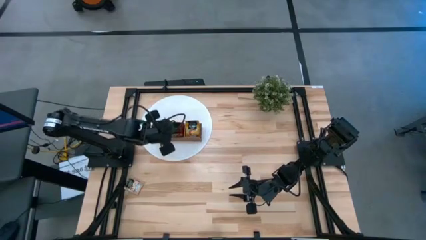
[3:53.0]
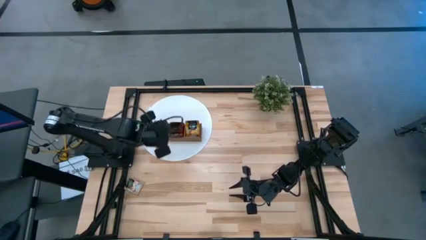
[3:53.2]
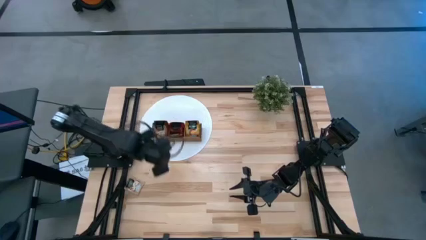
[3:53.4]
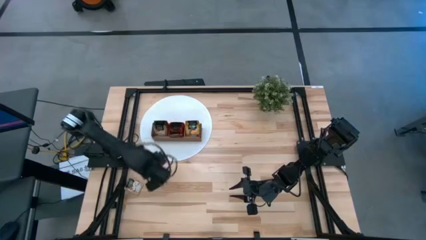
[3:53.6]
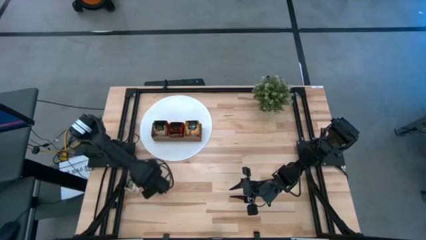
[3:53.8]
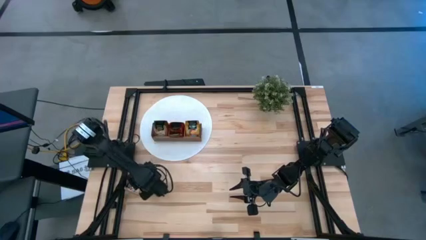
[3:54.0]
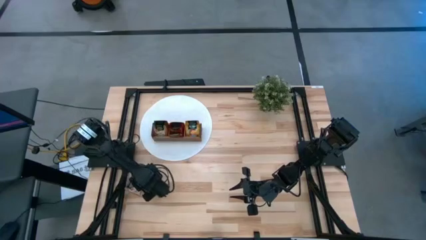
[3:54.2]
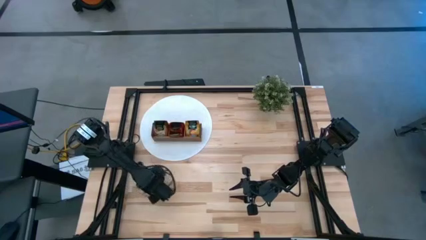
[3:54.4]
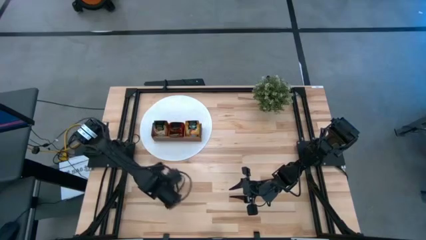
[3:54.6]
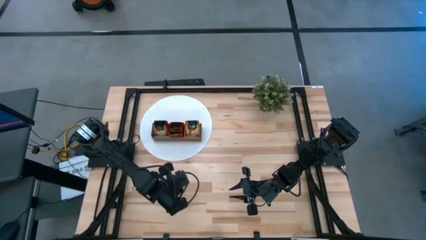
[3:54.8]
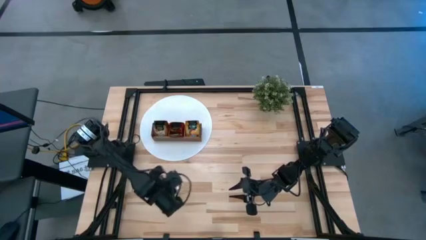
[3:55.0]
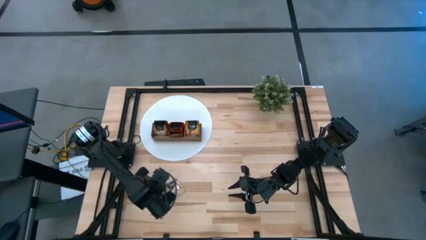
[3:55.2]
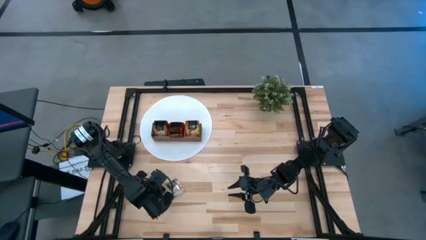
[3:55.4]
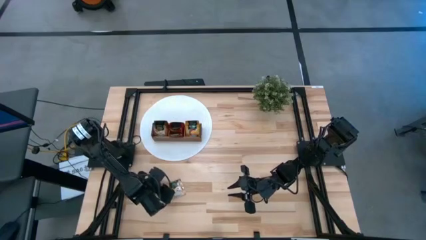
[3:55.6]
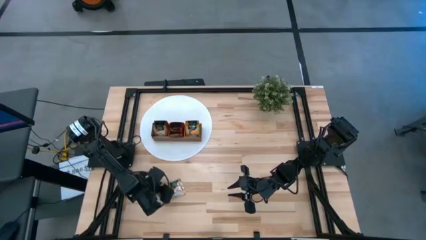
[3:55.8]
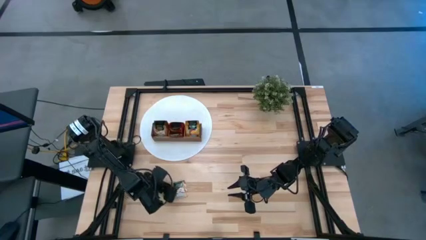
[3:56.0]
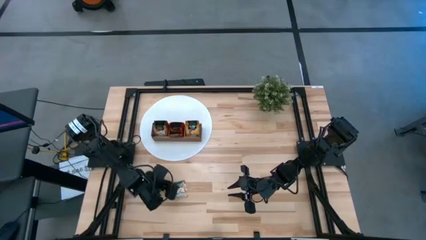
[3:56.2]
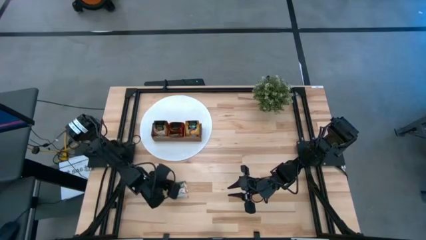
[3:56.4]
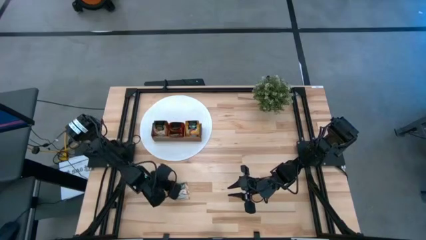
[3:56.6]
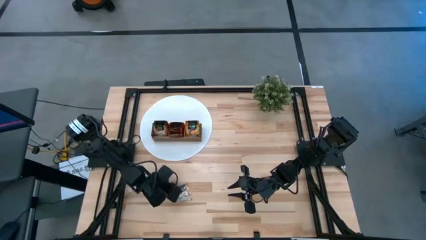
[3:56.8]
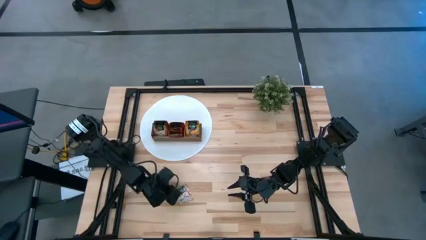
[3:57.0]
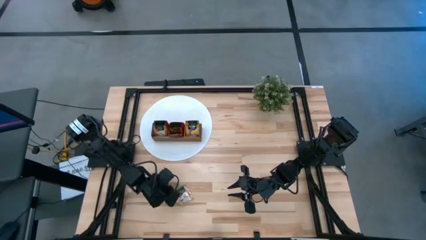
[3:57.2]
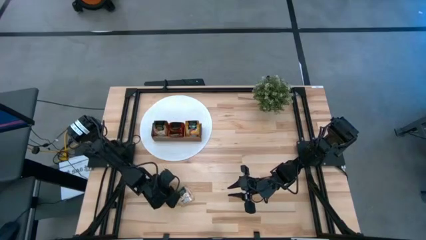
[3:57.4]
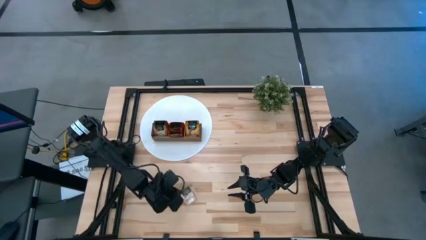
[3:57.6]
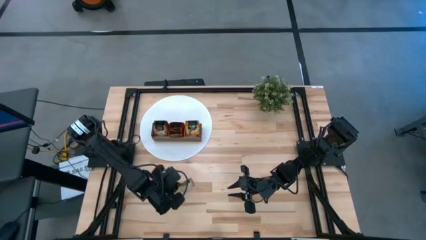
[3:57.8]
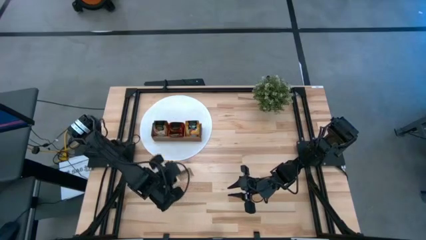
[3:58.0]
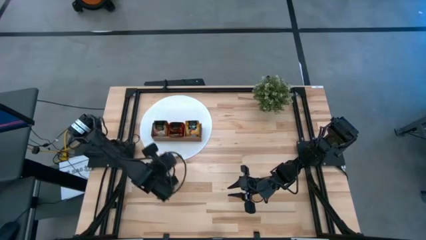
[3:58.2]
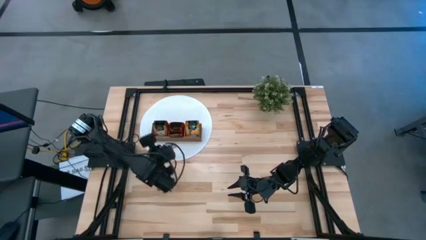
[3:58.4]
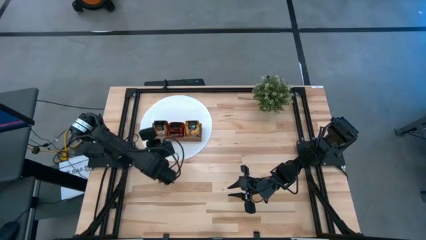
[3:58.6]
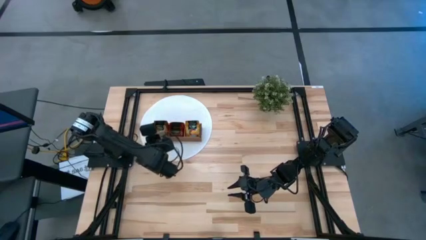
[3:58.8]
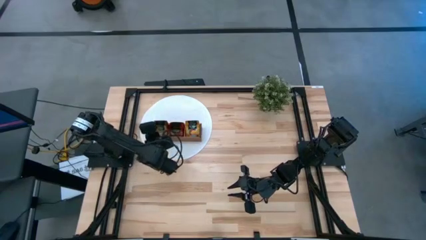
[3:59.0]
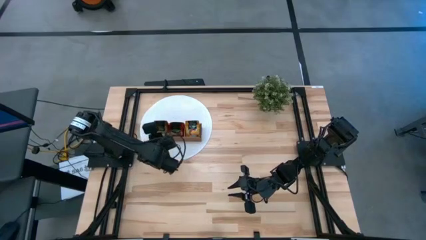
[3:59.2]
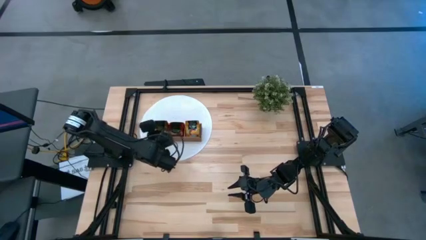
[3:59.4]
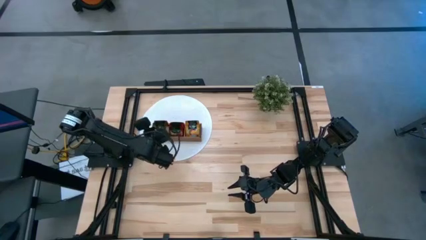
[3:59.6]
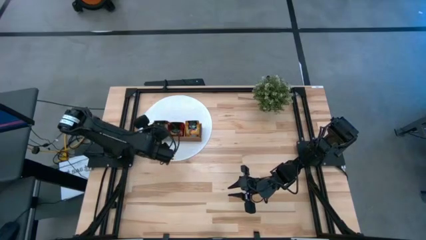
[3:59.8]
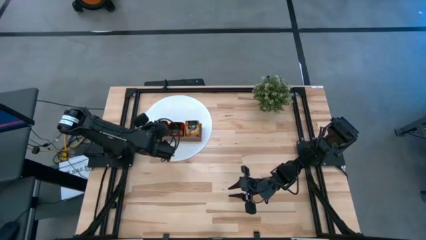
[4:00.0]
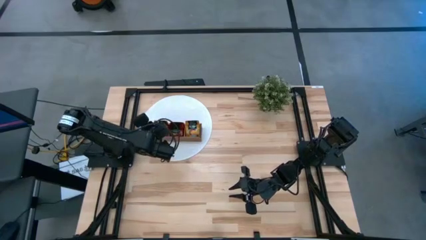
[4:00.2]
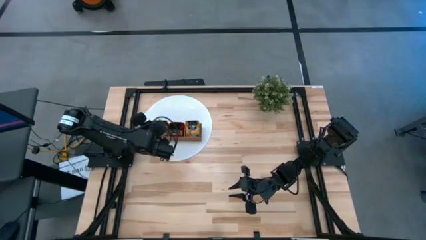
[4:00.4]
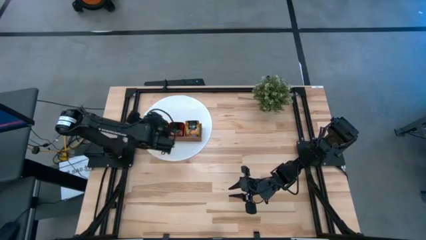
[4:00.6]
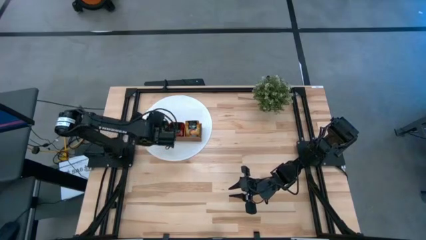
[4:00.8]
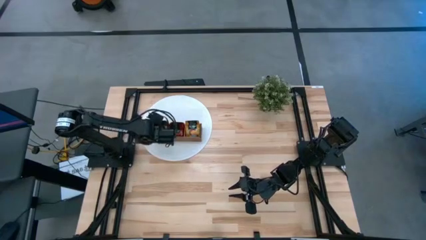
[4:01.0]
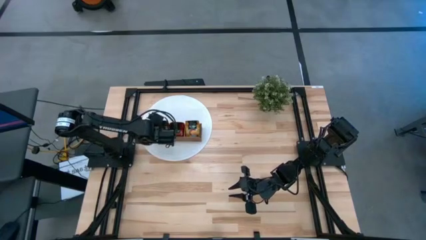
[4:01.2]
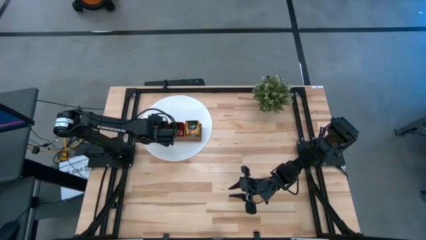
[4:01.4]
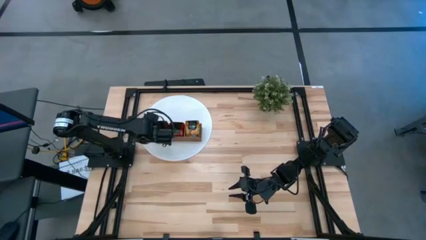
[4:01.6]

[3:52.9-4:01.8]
Task: Pick & Place Tea
Put the brown tea bag into the left section of the wooden organizer

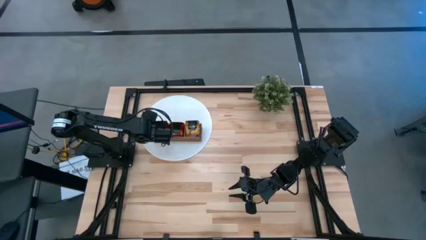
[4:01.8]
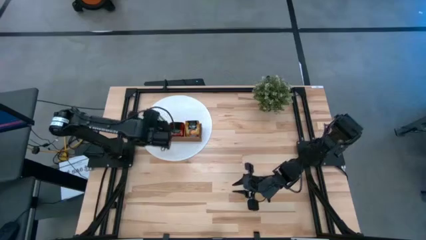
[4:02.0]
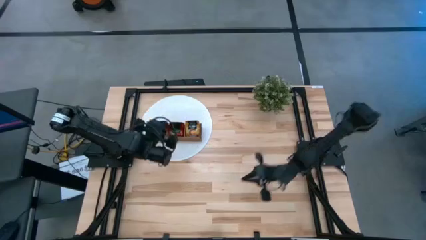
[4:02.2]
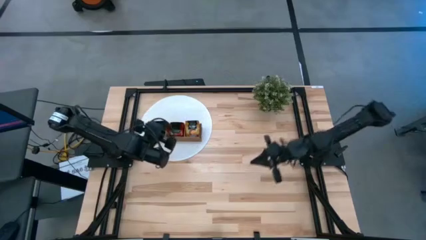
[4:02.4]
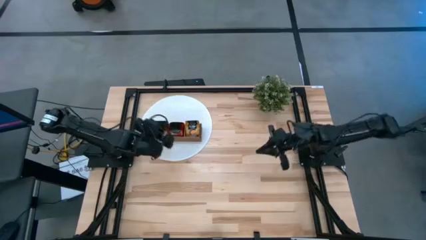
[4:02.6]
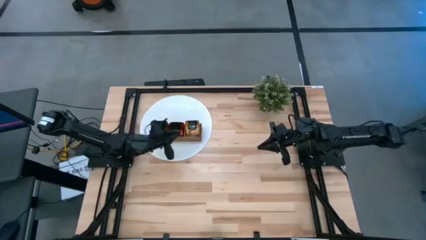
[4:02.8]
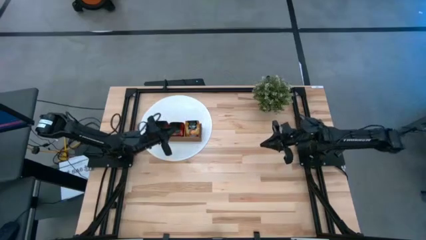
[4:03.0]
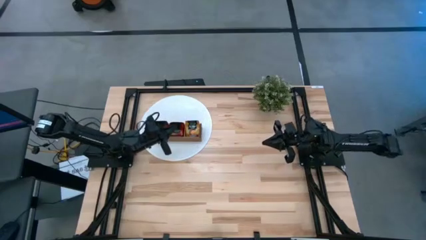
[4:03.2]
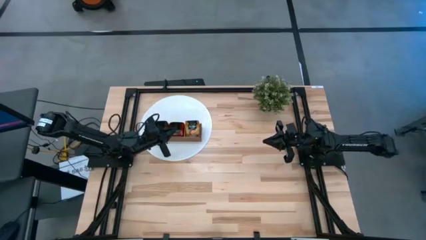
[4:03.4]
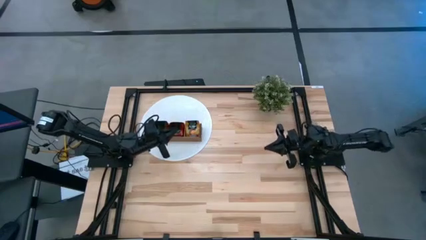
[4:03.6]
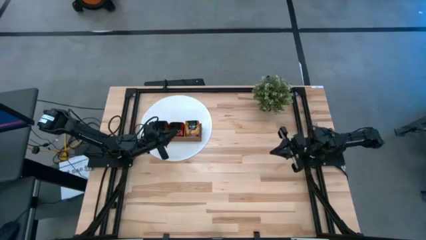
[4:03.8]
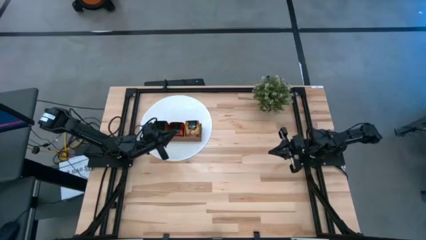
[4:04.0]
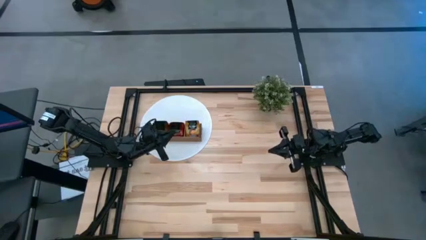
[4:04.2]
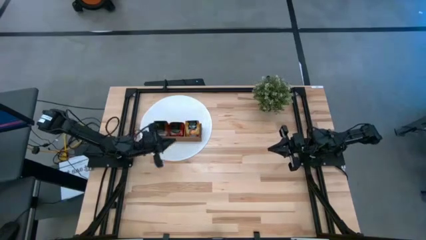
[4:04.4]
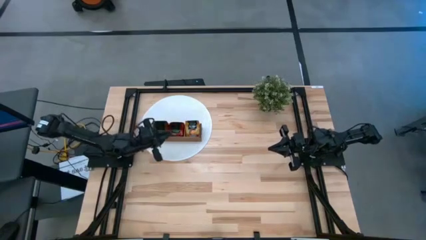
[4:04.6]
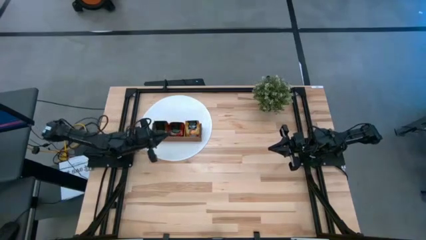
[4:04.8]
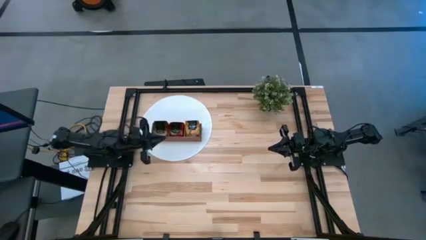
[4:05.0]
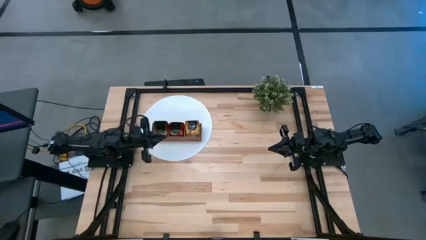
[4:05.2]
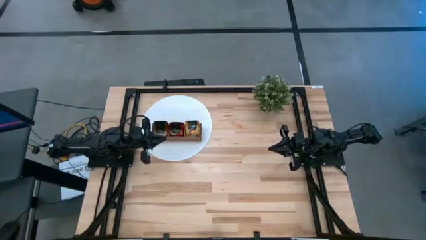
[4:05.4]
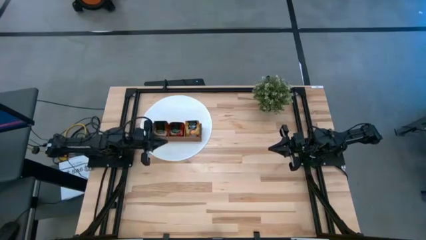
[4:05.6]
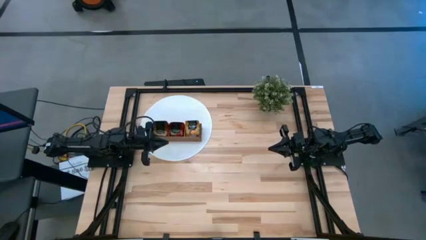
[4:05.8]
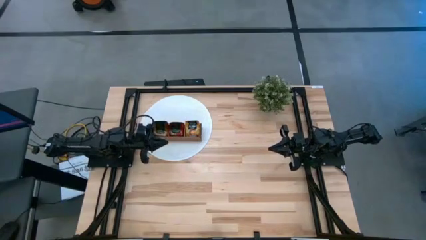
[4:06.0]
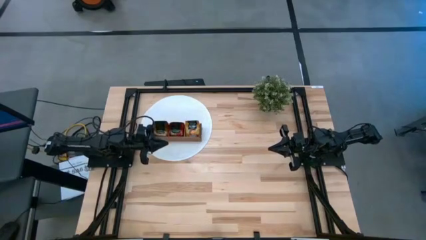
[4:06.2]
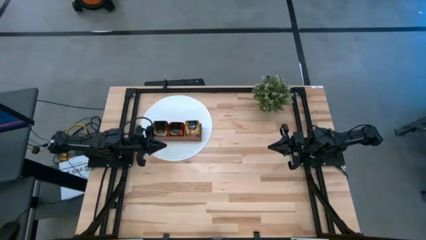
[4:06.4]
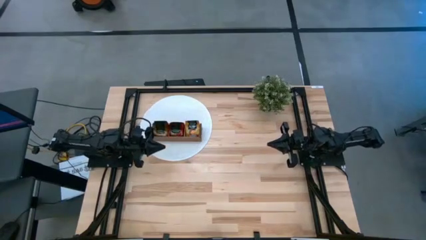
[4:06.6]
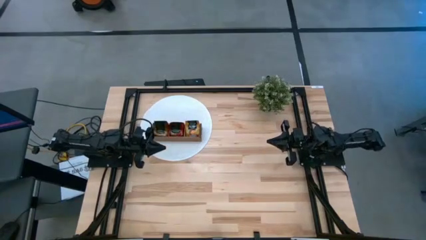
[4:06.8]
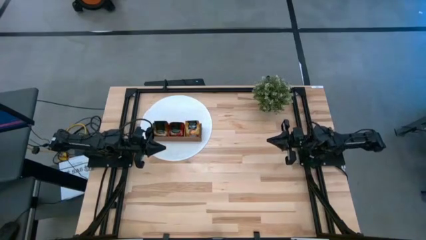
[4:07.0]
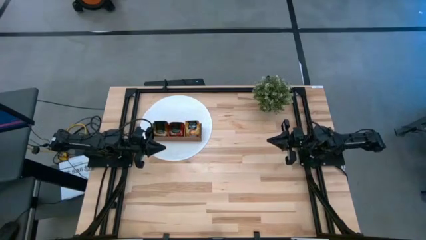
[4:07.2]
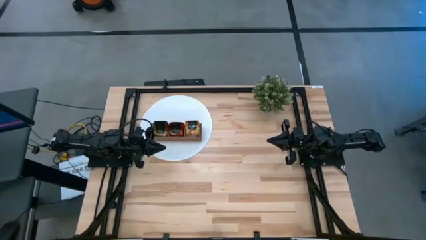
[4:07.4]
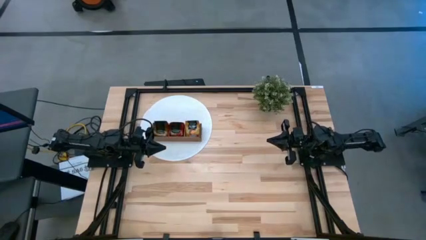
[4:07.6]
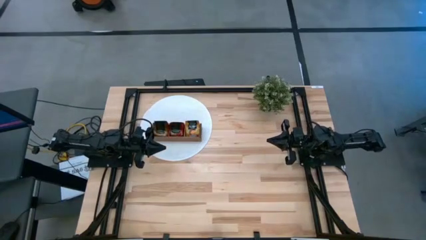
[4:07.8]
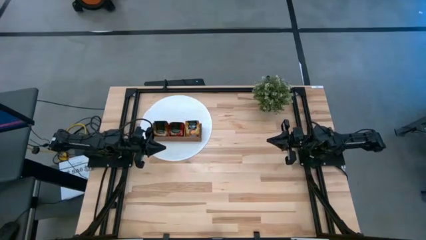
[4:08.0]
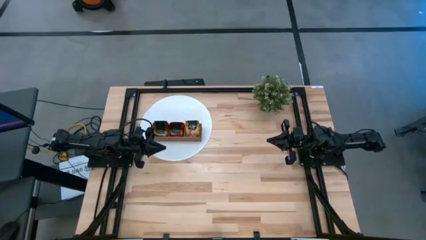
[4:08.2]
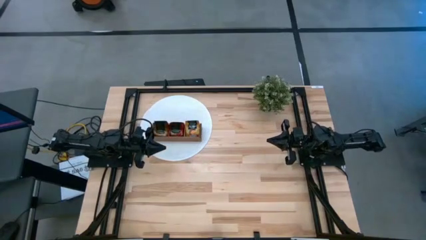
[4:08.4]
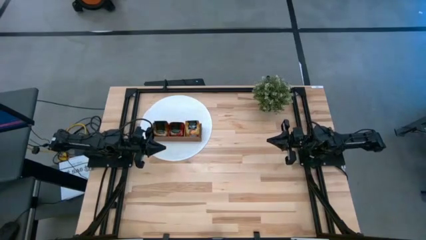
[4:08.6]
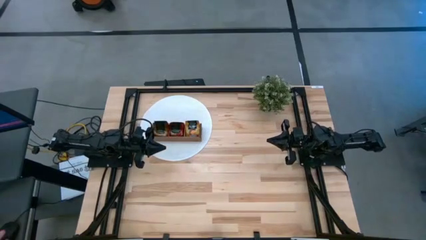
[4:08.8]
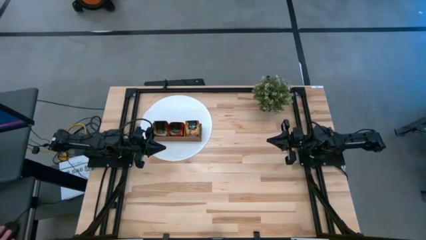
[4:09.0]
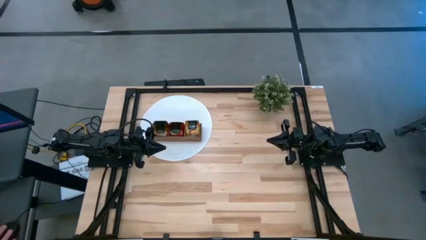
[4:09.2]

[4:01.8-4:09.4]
Return to Home Position
